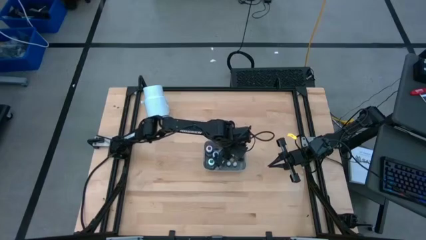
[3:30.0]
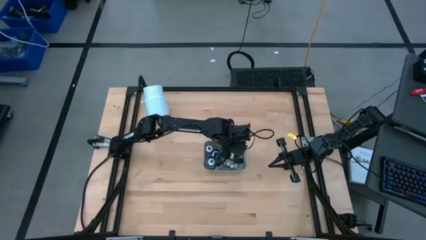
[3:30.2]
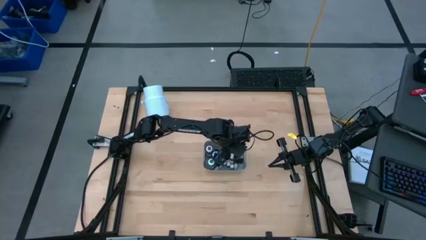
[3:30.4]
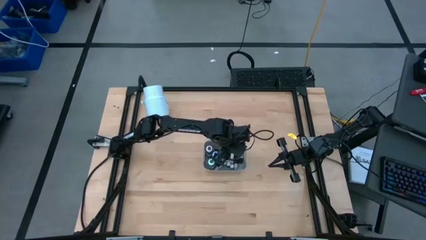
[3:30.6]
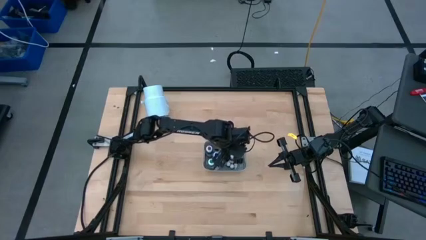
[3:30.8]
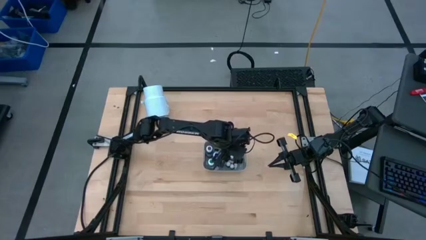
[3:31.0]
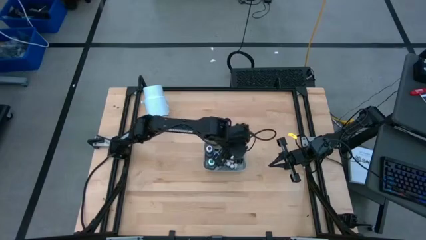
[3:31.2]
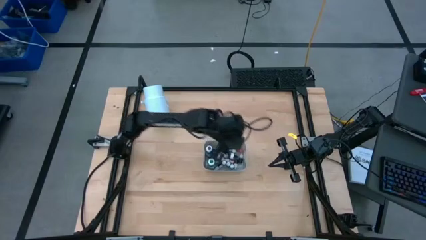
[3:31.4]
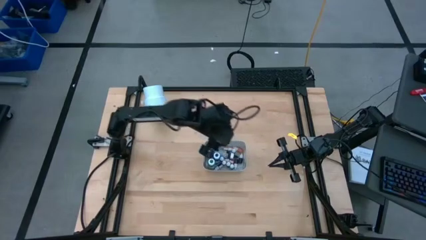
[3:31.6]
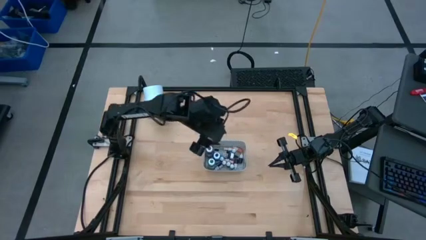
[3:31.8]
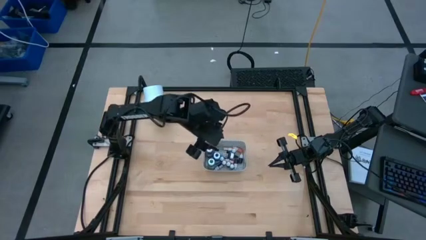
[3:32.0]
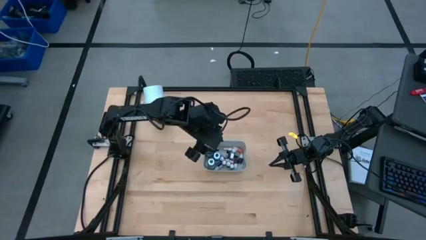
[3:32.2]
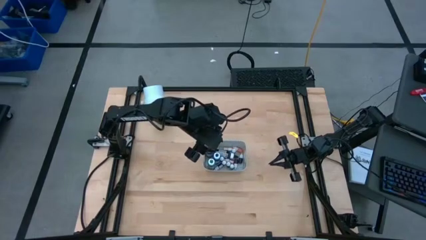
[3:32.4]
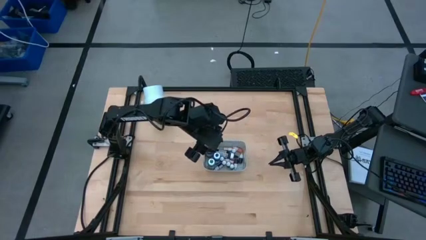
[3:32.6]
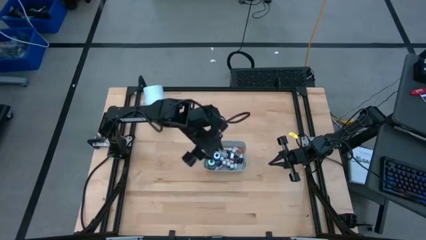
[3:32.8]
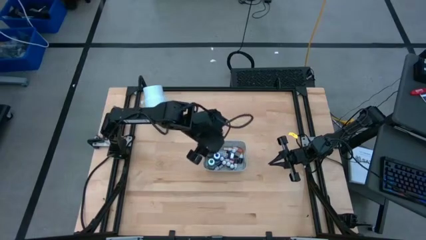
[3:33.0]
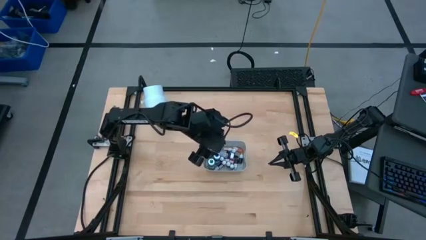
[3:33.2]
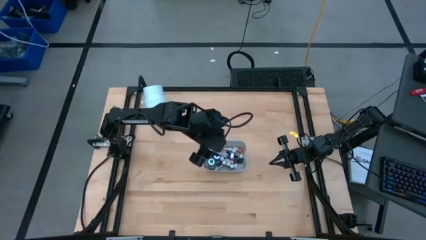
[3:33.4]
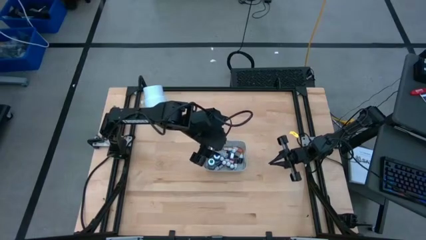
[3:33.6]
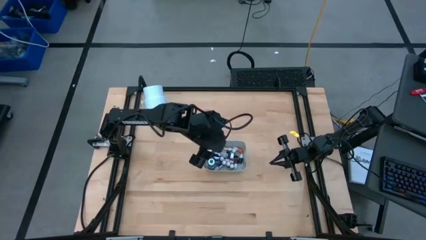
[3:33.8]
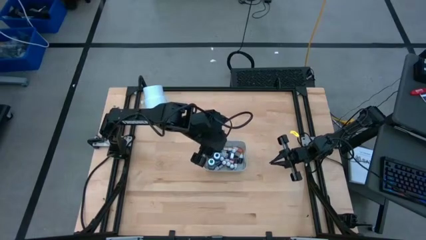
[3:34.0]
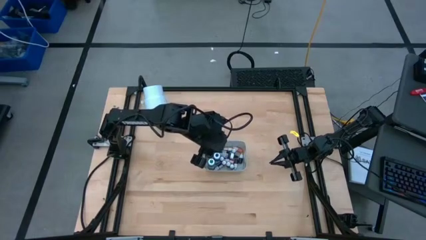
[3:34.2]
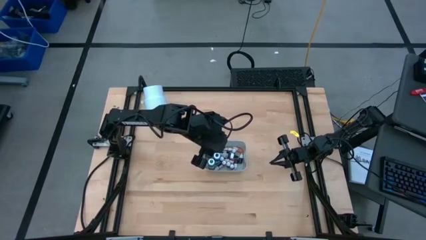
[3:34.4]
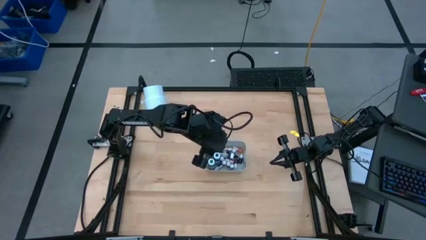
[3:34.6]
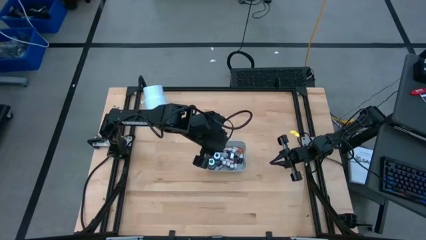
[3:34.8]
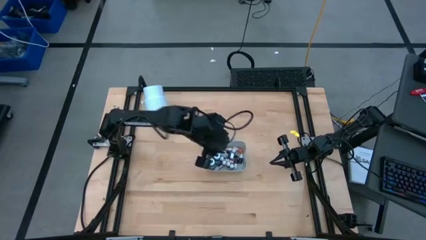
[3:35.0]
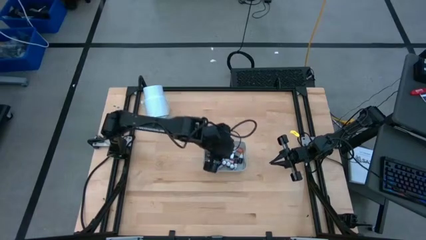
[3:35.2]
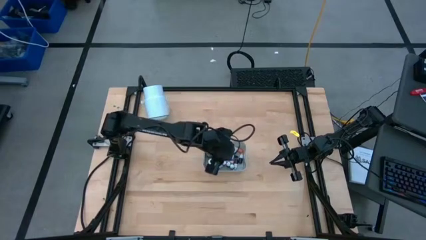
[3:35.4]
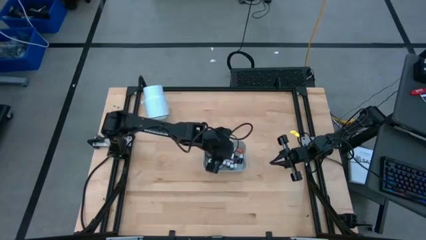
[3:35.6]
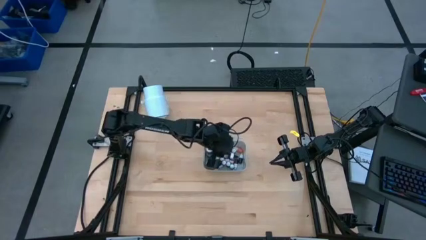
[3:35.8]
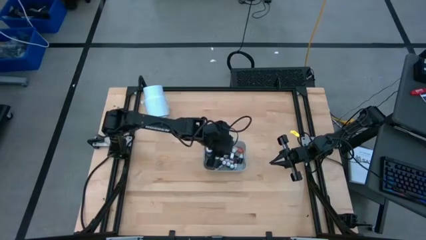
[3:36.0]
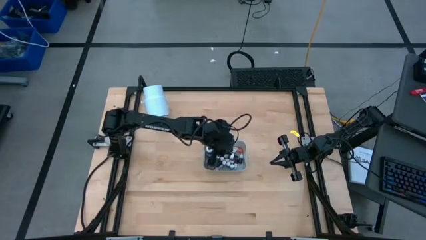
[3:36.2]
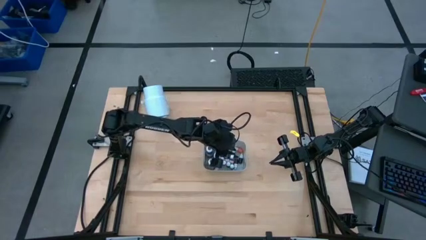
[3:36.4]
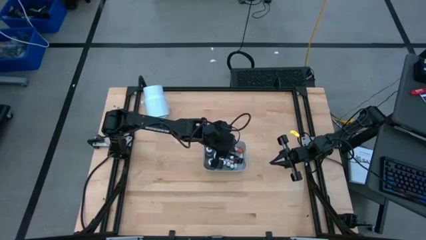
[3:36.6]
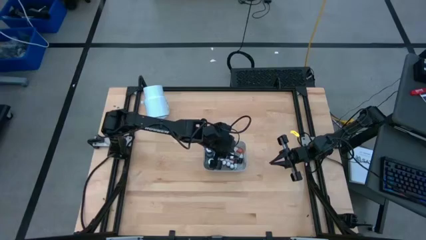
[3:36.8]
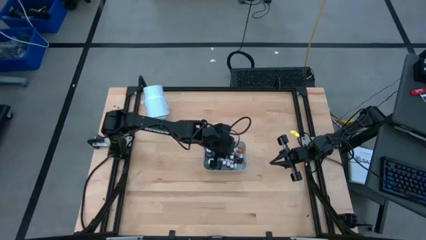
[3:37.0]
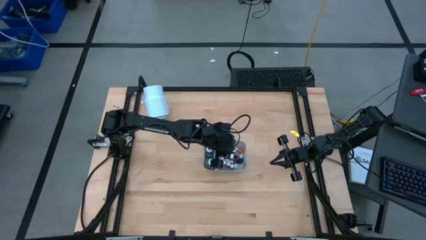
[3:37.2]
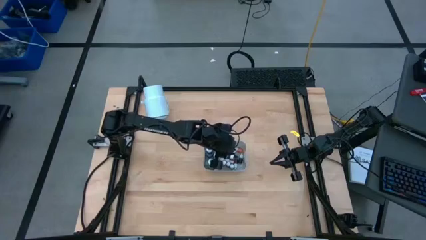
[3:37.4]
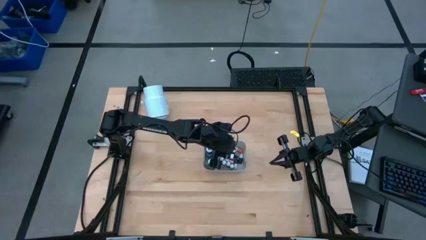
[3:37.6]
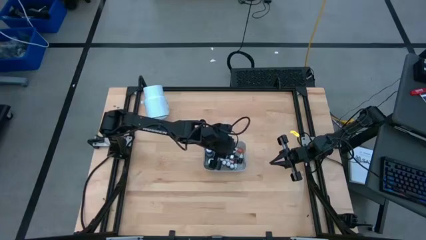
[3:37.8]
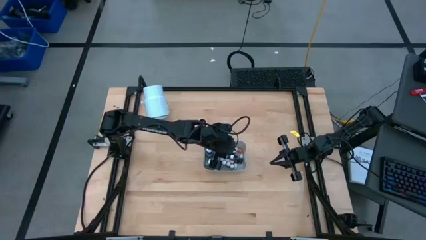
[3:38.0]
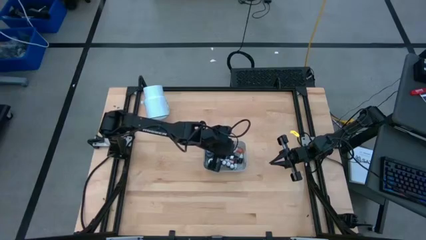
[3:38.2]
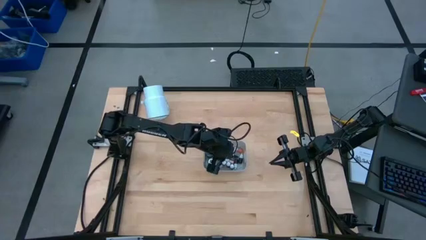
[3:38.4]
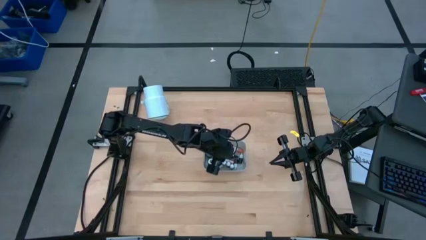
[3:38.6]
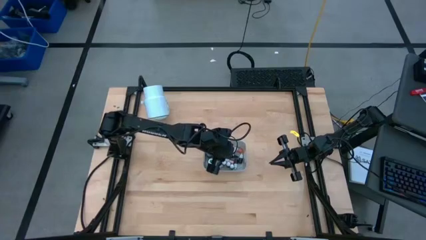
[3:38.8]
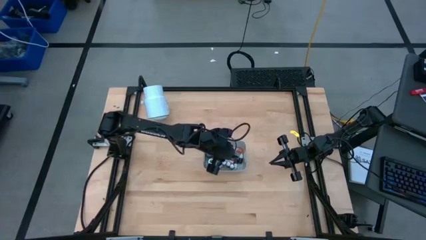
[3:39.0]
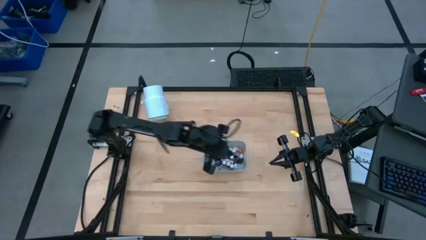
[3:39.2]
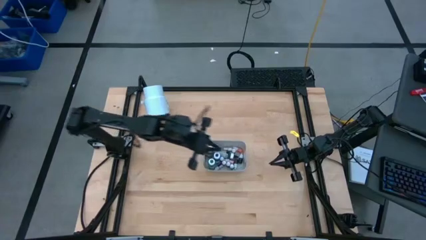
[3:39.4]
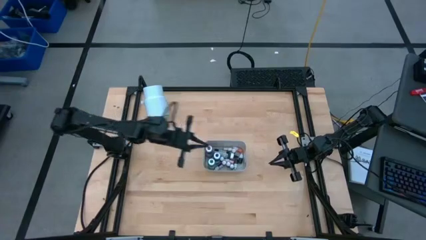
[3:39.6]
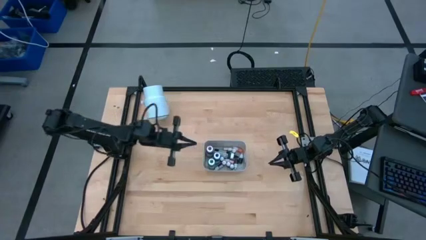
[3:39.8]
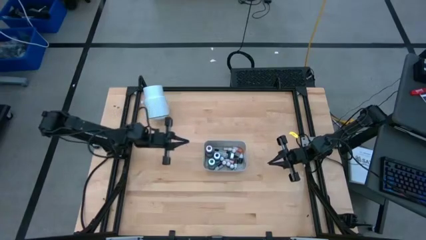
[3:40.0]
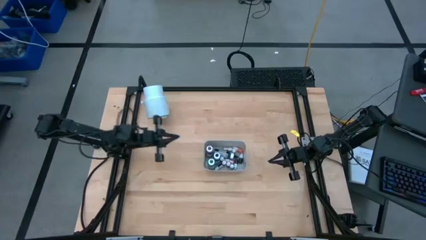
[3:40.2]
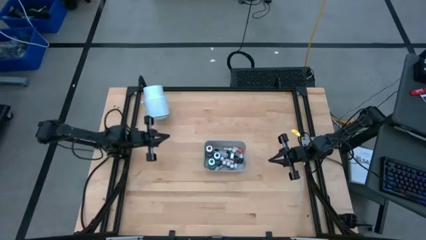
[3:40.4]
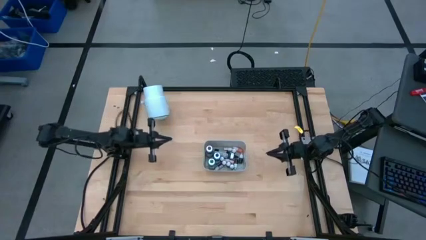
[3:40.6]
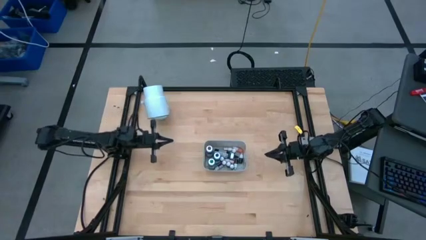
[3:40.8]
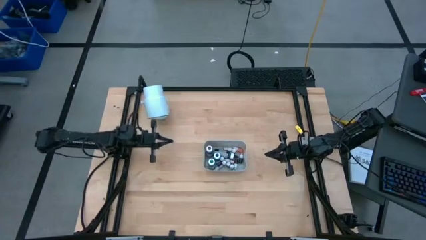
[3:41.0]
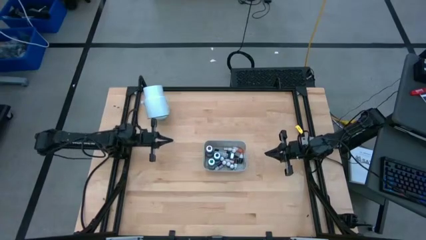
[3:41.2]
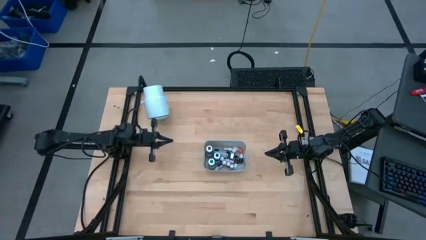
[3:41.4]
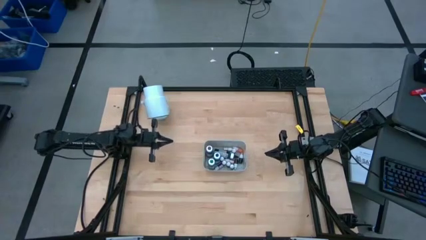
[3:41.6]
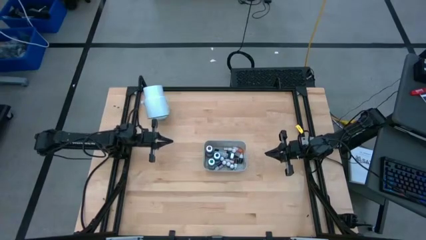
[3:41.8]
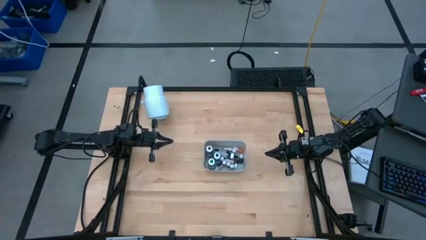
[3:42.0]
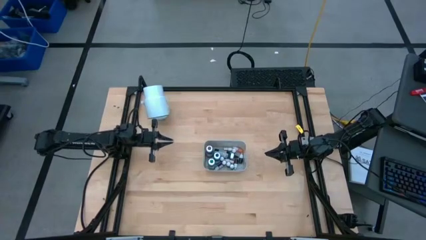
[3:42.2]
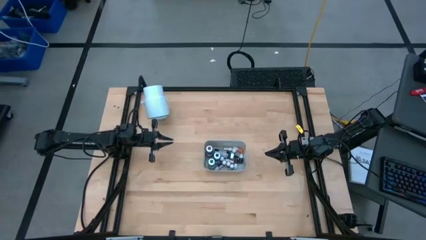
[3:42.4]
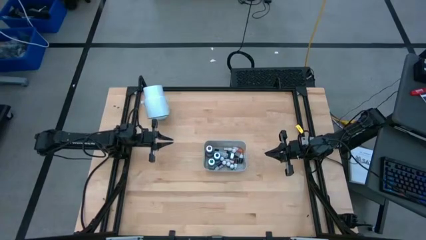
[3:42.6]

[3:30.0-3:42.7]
Task: Pick & Place food coloring
Return to Home Position

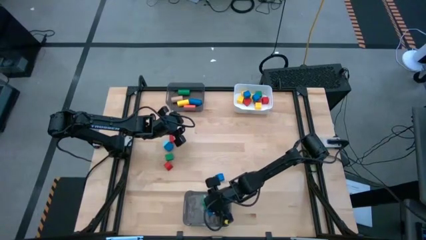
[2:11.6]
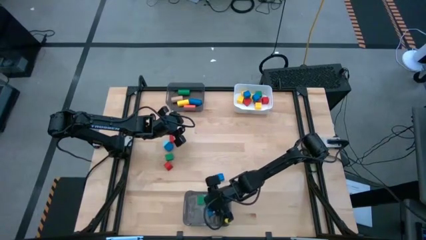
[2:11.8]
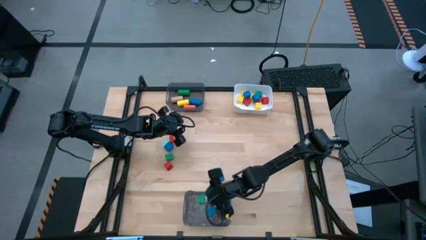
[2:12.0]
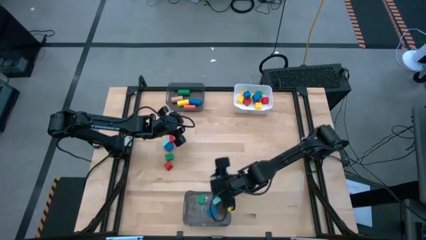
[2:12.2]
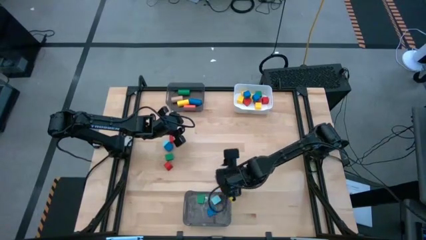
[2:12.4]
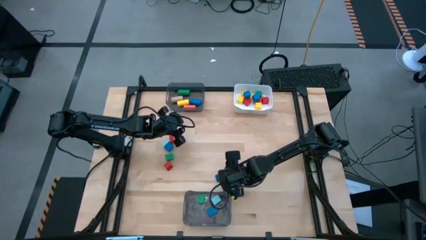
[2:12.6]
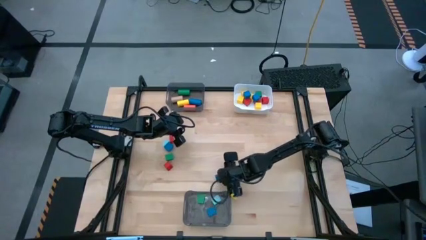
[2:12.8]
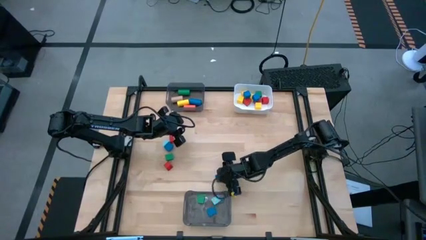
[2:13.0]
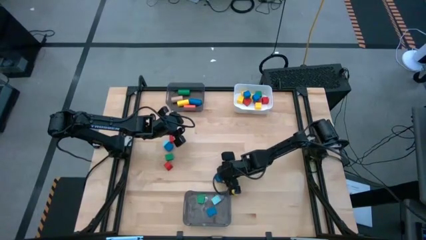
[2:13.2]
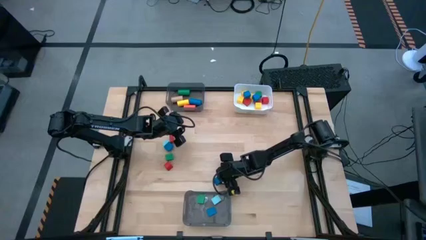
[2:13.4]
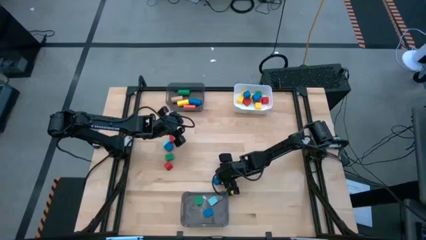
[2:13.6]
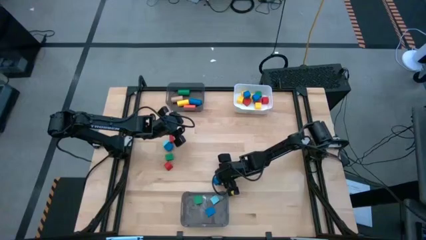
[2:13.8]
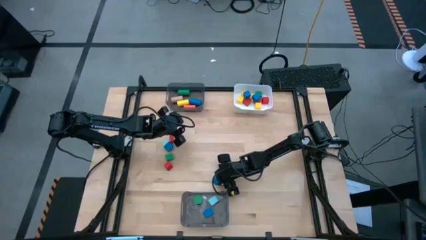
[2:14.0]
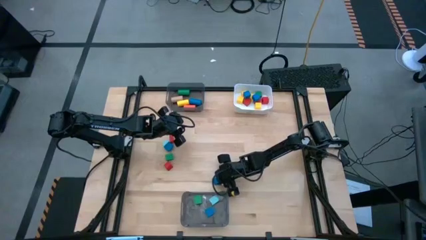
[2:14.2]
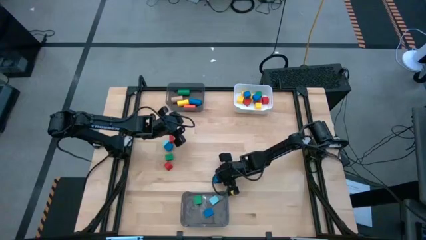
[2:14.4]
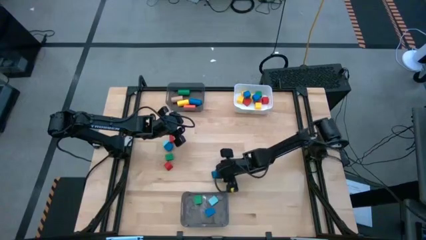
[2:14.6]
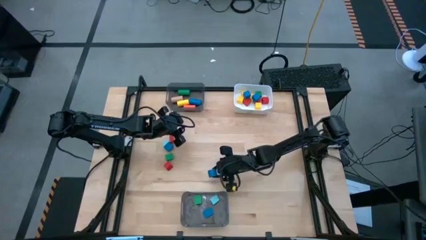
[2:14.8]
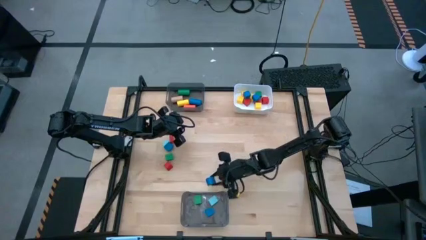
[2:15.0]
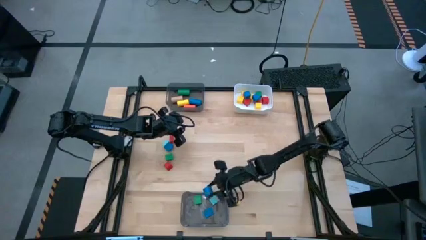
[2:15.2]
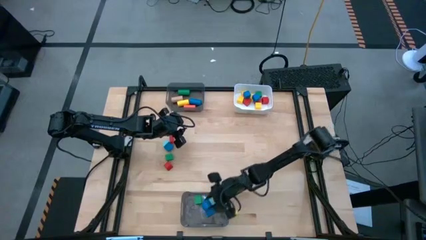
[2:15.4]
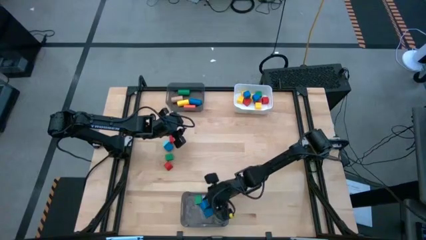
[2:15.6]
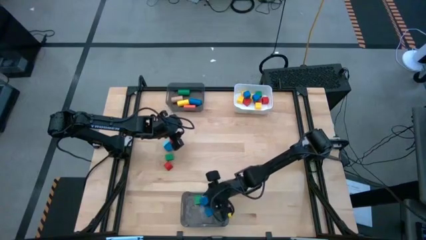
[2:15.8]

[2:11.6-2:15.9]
Task: Sort blocks by size
Put the blue half circle block into the bottom black bin
